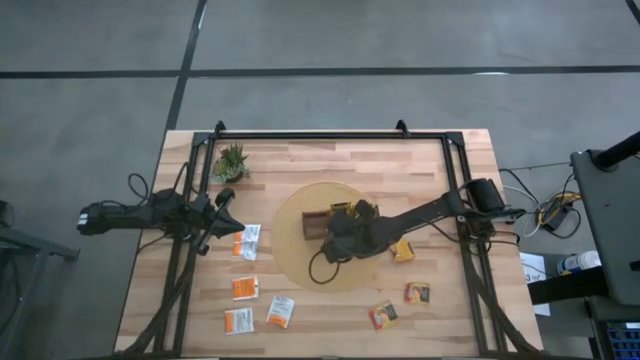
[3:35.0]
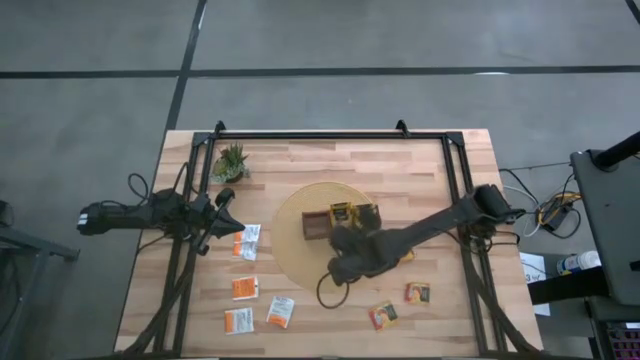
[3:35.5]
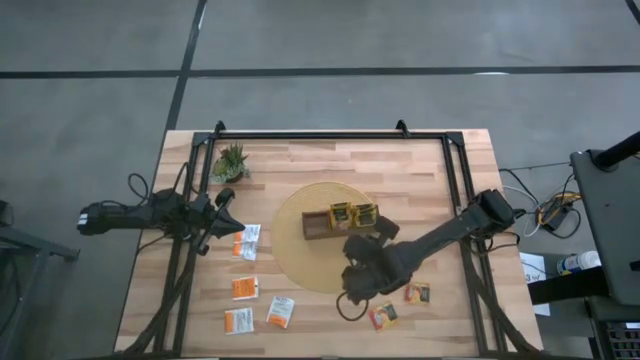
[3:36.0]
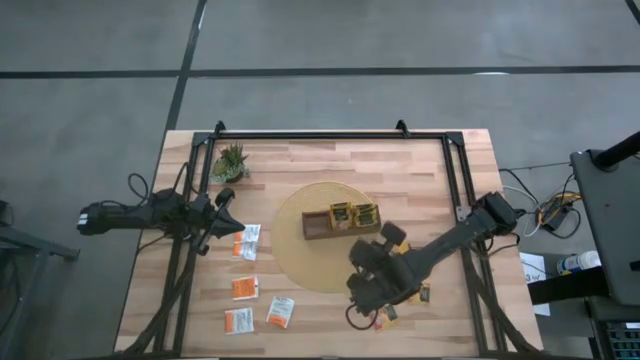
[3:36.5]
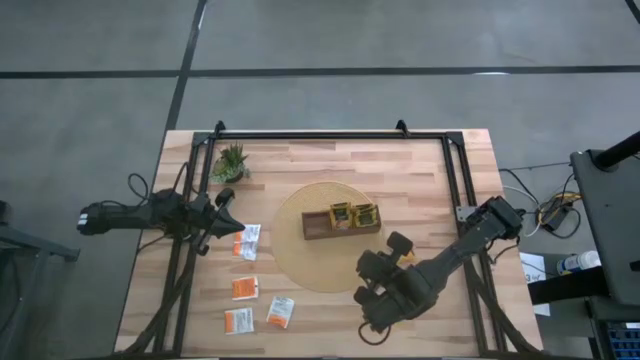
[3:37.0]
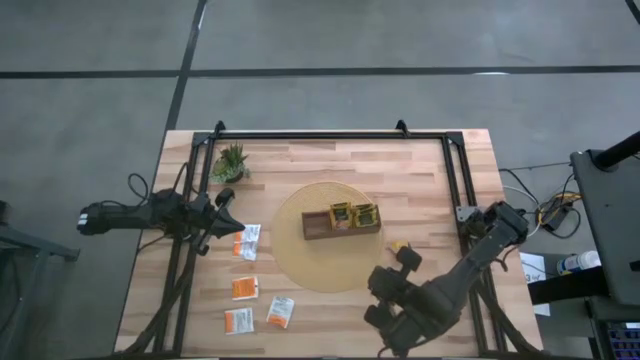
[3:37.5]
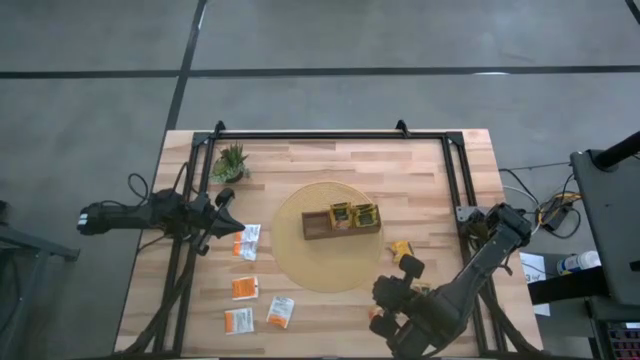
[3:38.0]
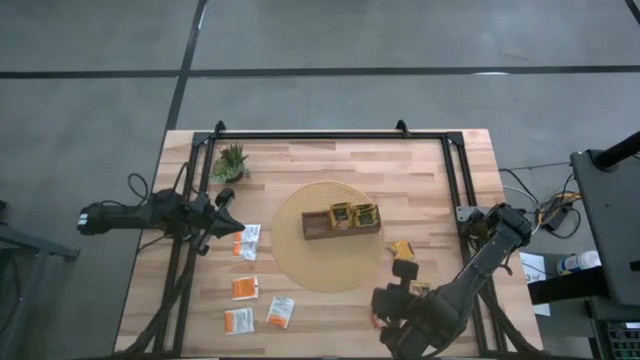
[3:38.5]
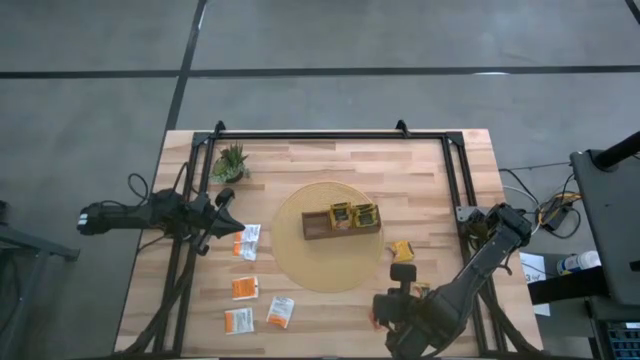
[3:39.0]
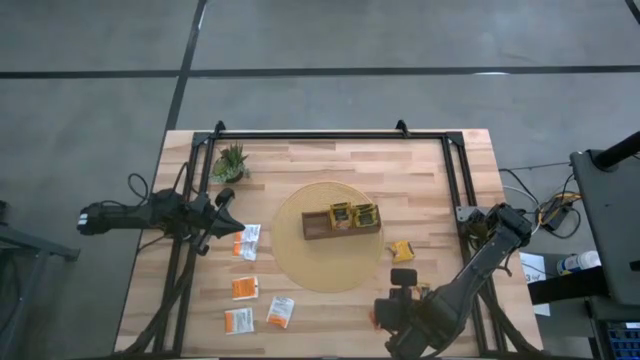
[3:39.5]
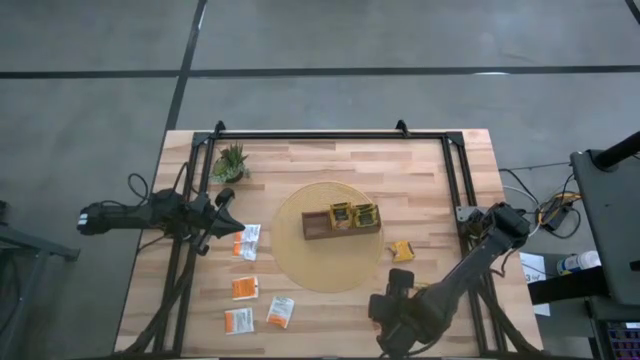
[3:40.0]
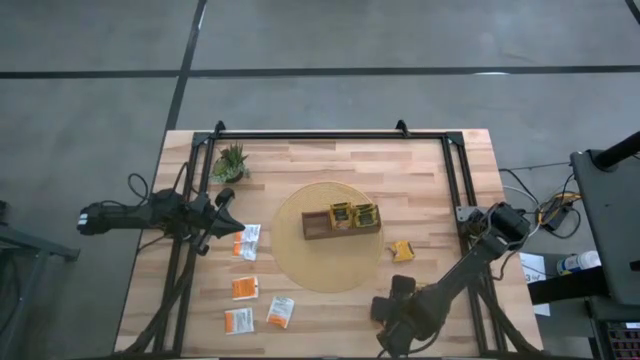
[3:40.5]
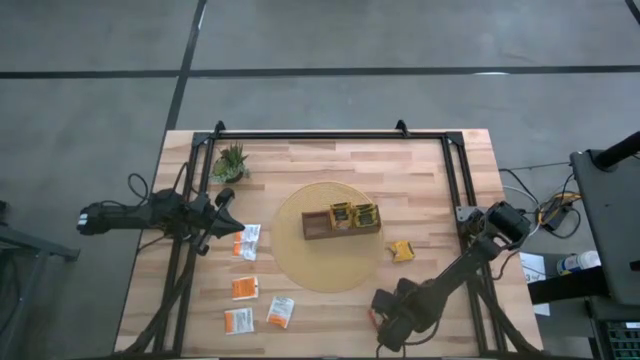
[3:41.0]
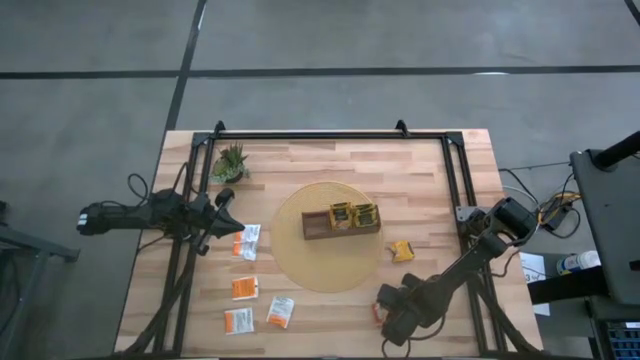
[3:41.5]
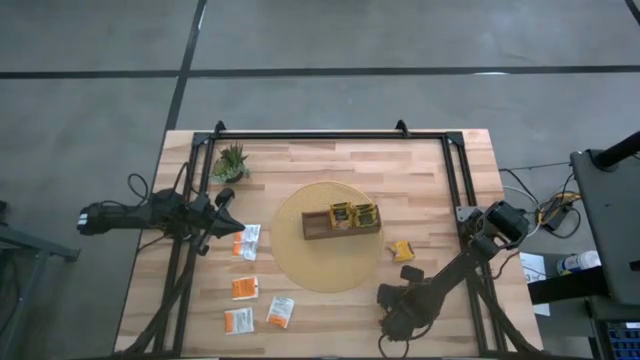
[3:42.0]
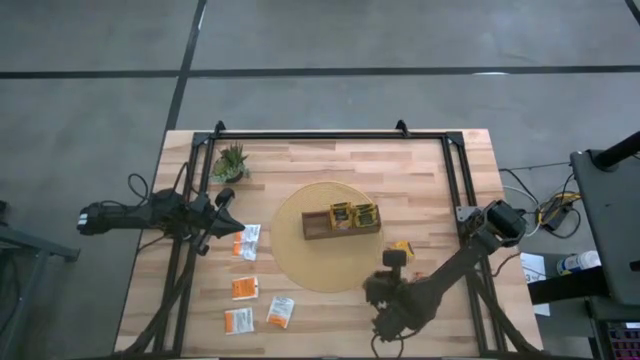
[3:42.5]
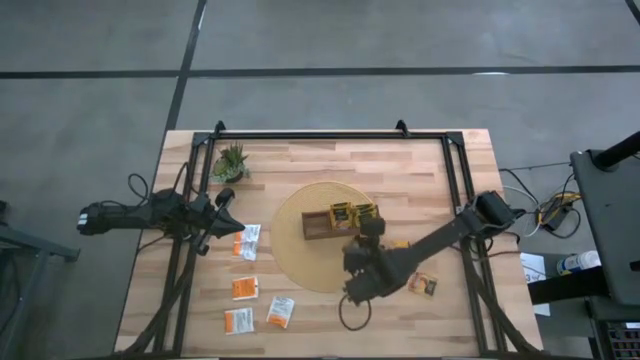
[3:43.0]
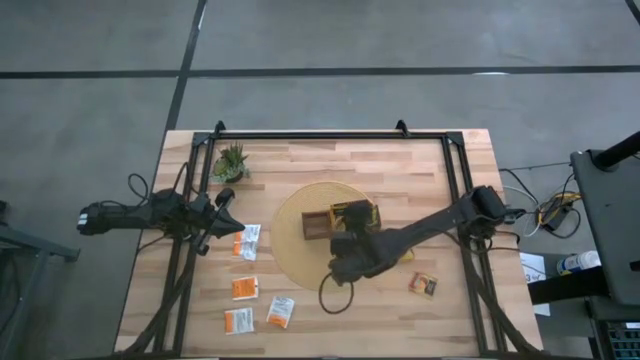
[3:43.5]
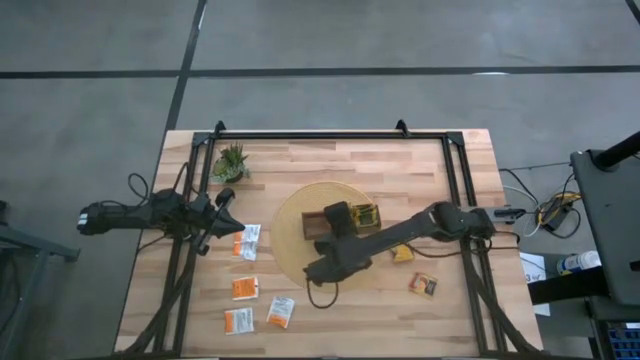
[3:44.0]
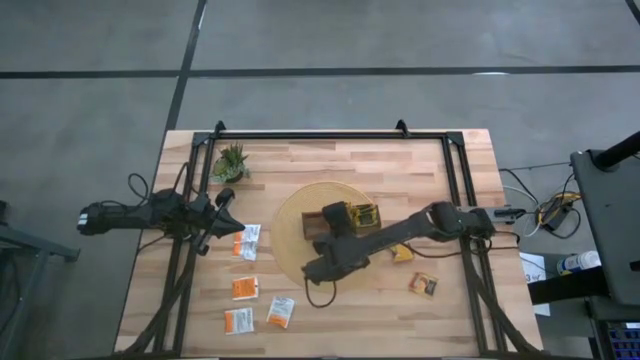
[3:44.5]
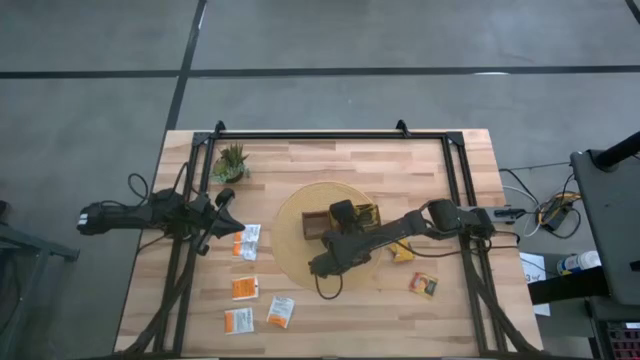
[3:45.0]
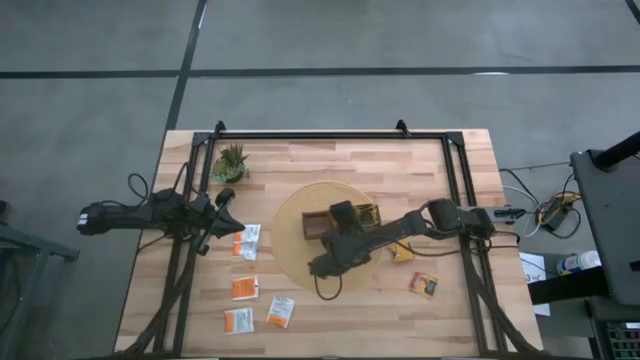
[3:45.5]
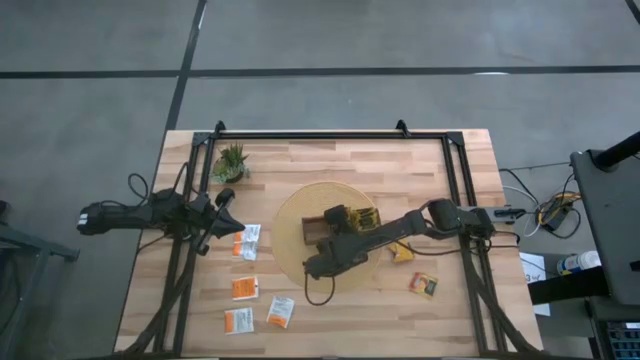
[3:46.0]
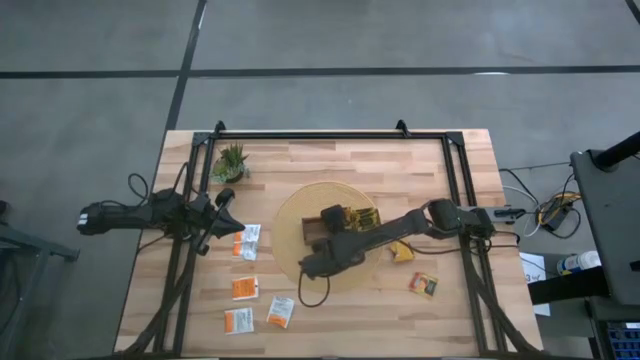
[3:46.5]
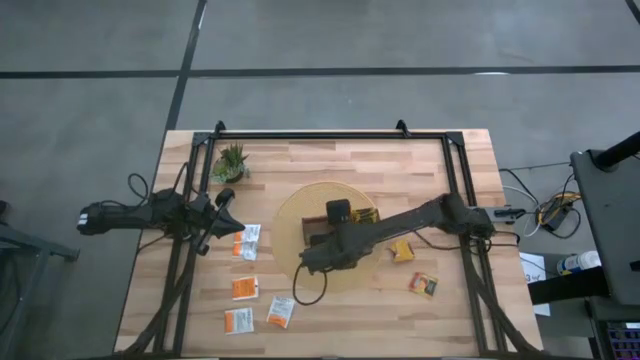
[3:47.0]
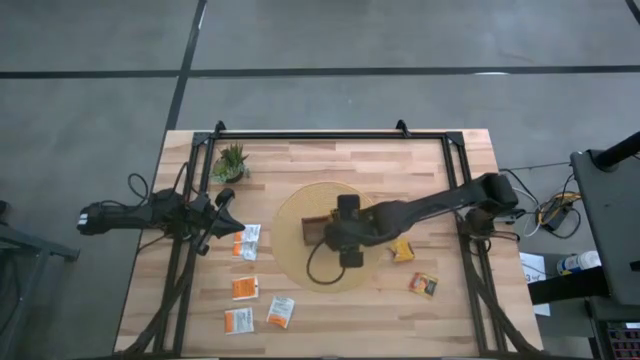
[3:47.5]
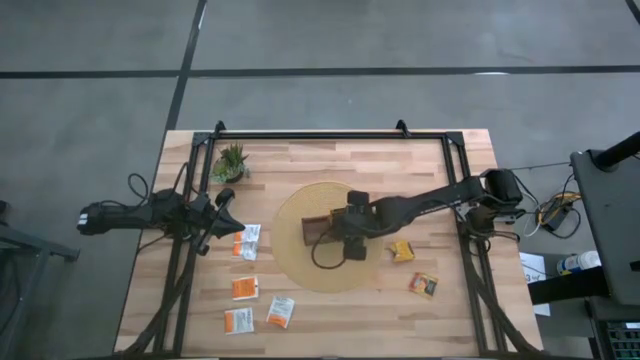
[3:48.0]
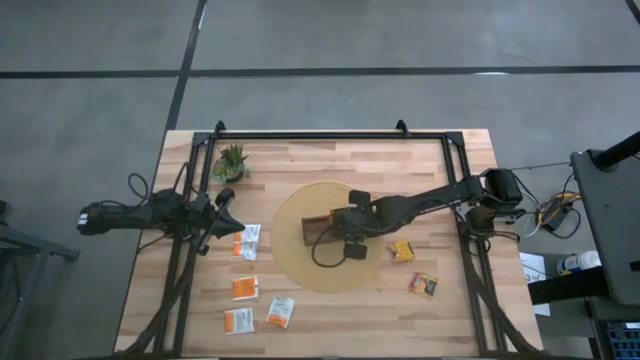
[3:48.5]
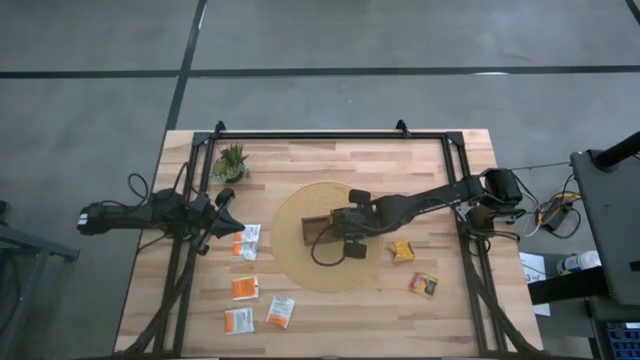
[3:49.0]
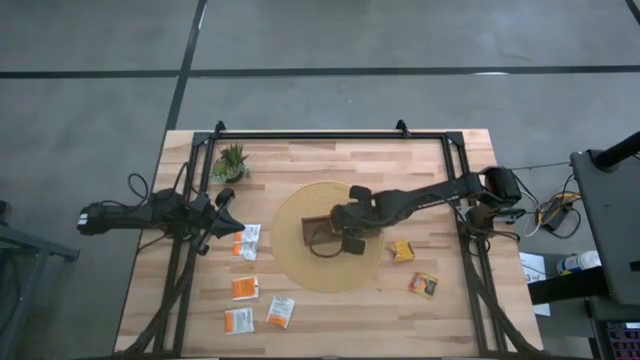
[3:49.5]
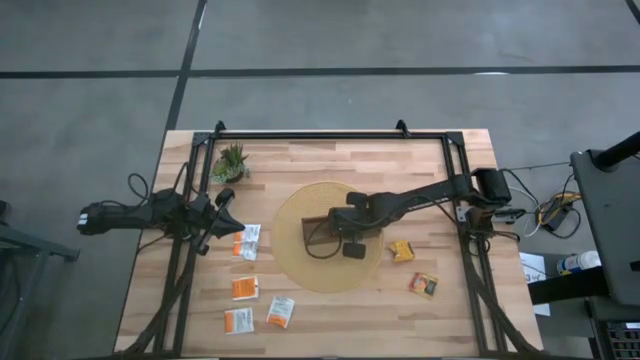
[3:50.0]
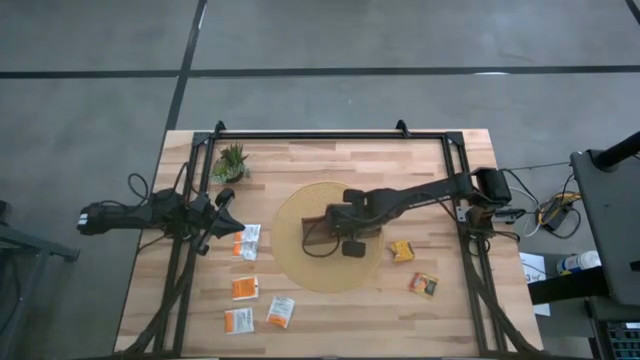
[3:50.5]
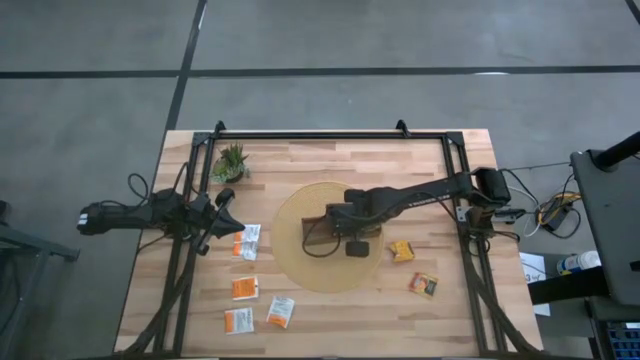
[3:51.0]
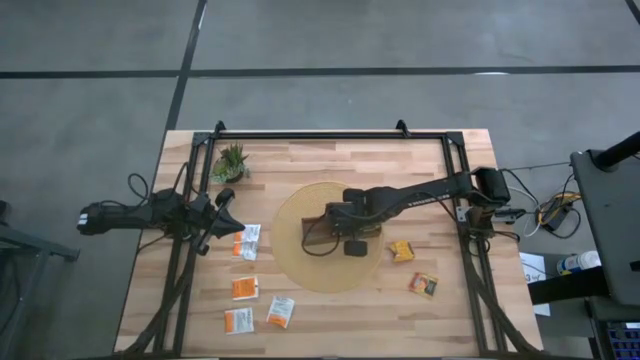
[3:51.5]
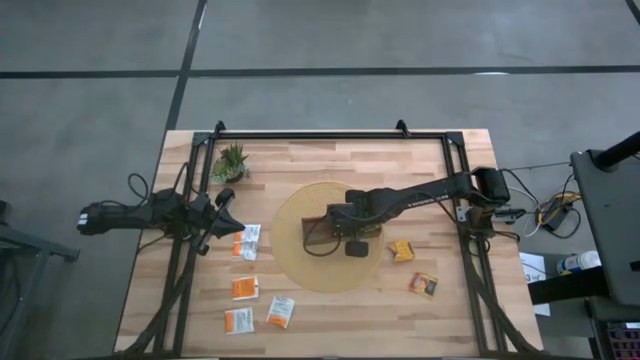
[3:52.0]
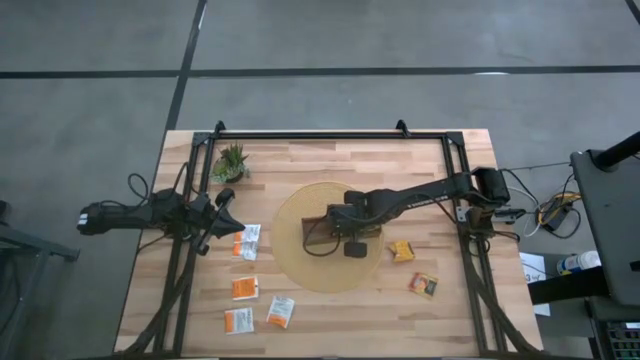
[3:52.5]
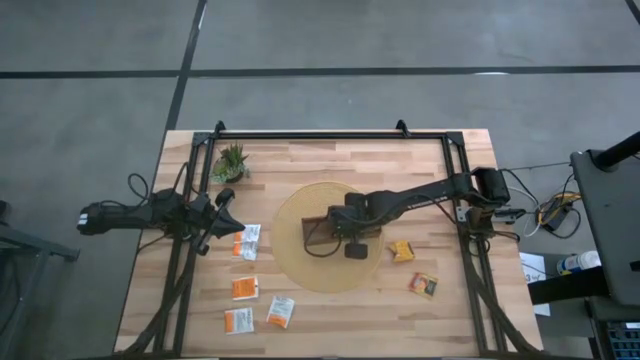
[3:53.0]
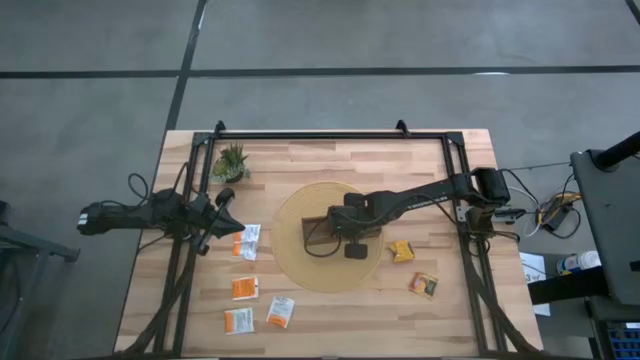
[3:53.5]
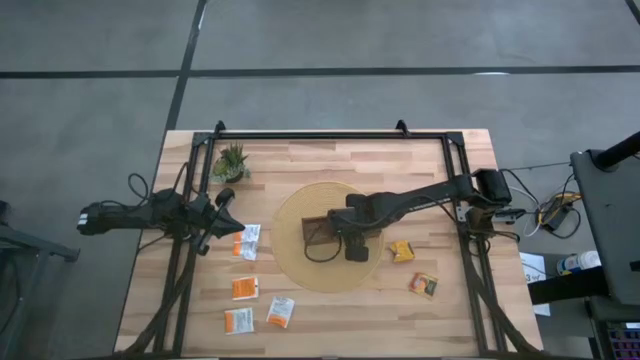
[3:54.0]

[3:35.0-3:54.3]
Task: Pick & Place Tea
Put the bottom yellow tea bag into the middle of the wooden organizer

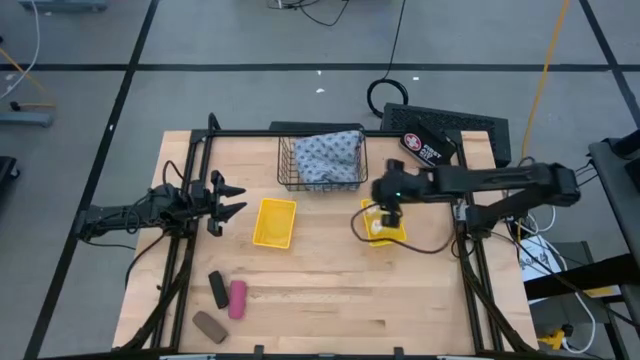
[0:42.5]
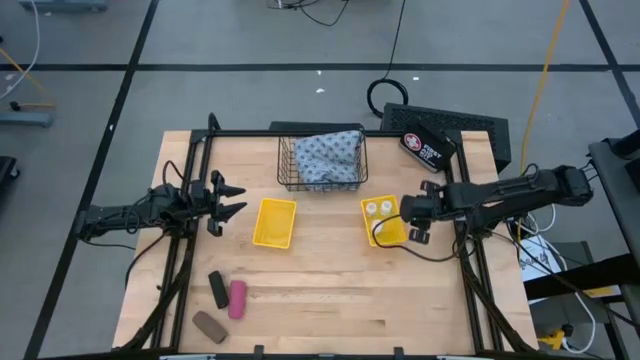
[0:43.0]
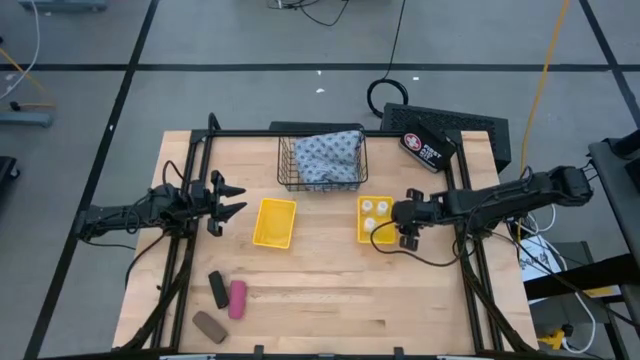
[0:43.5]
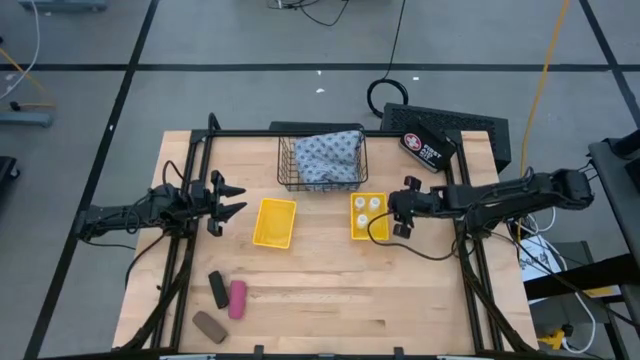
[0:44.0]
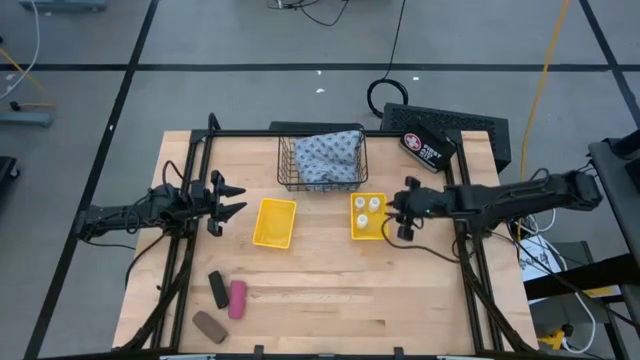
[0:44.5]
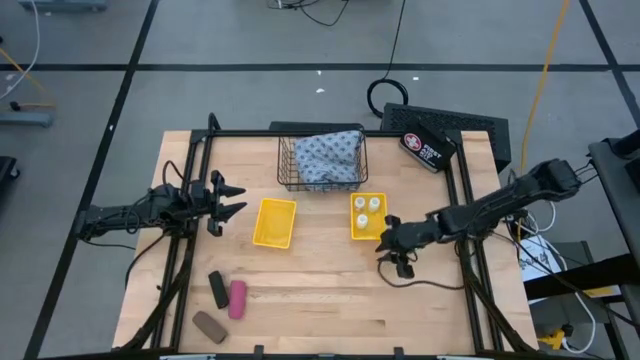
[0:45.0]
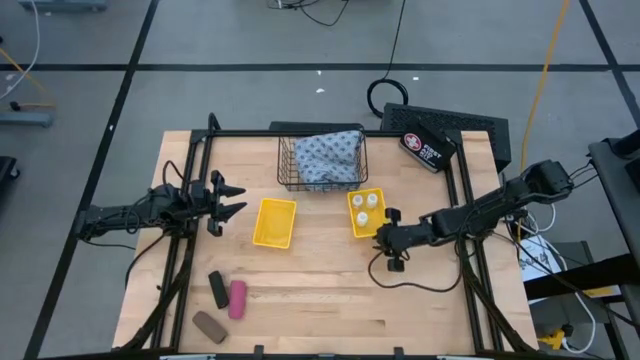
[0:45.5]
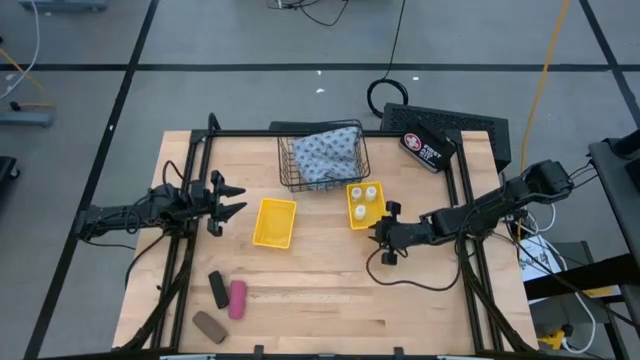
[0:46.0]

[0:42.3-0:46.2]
Task: Pick & Place Medicine items
Adjust the right yellow basket
